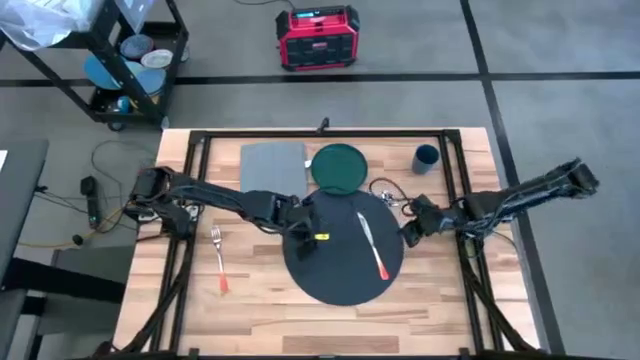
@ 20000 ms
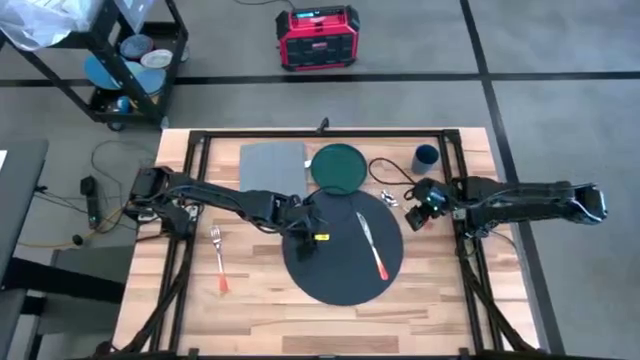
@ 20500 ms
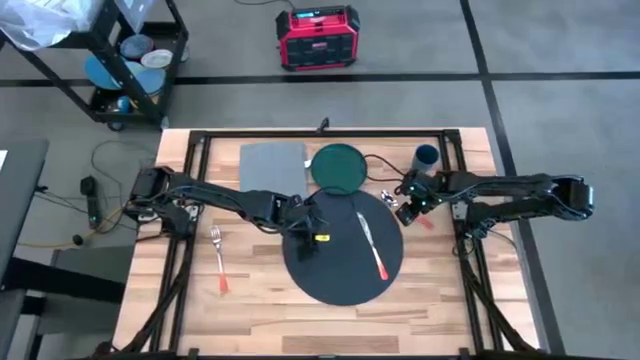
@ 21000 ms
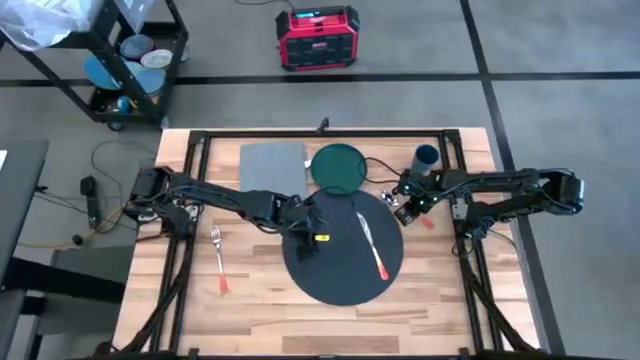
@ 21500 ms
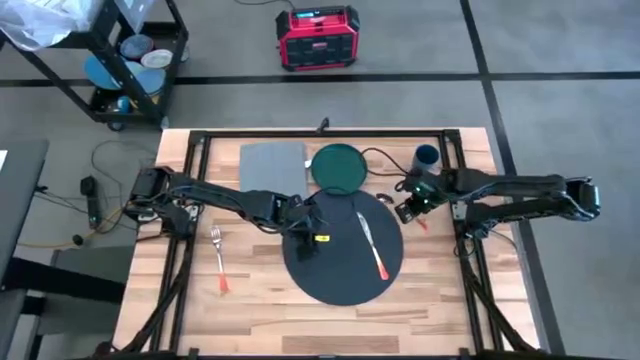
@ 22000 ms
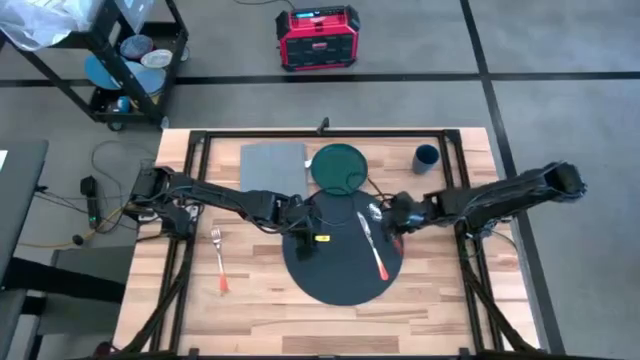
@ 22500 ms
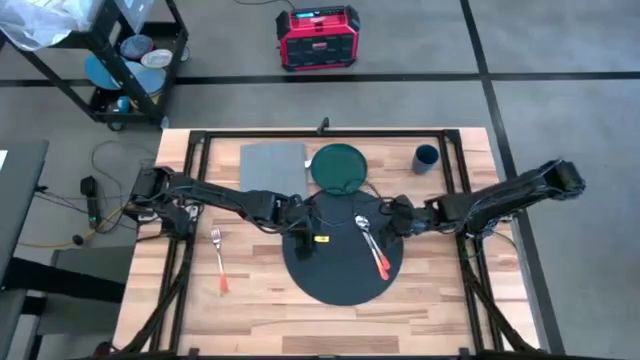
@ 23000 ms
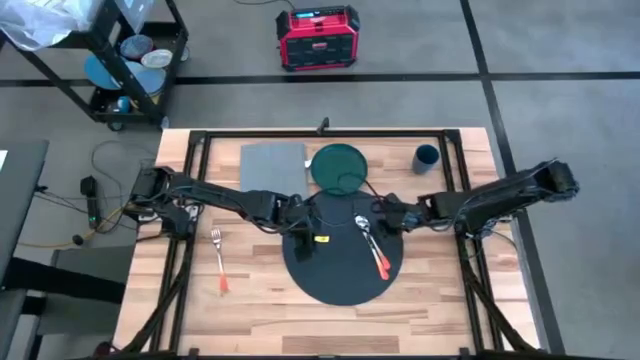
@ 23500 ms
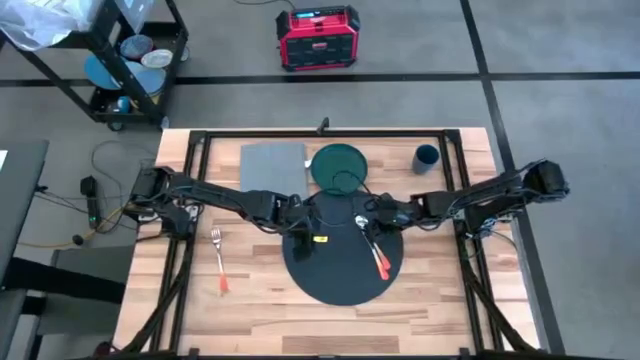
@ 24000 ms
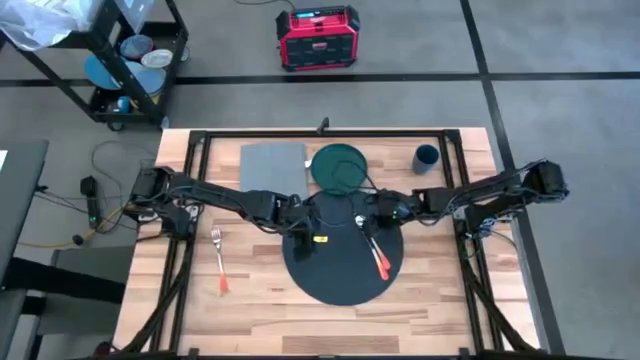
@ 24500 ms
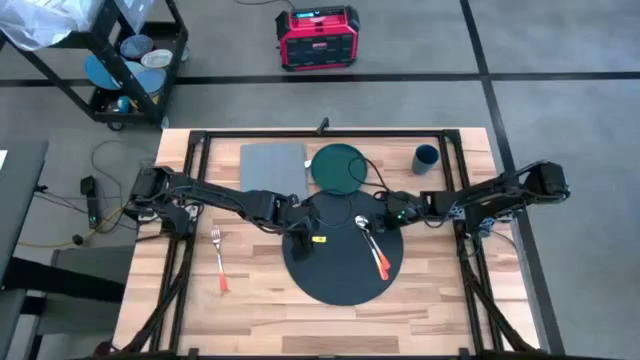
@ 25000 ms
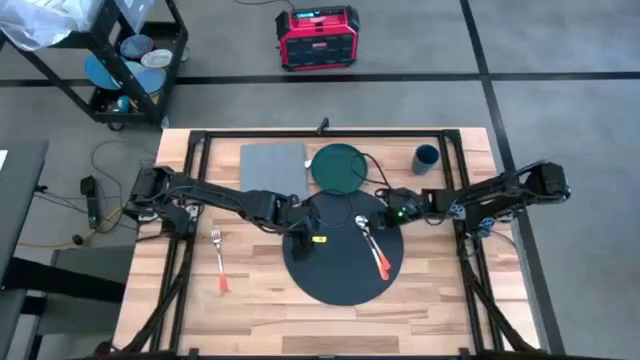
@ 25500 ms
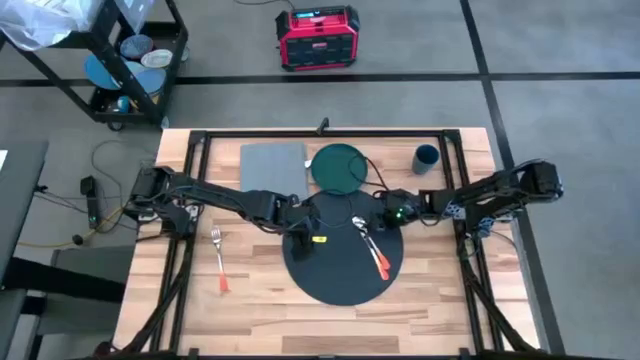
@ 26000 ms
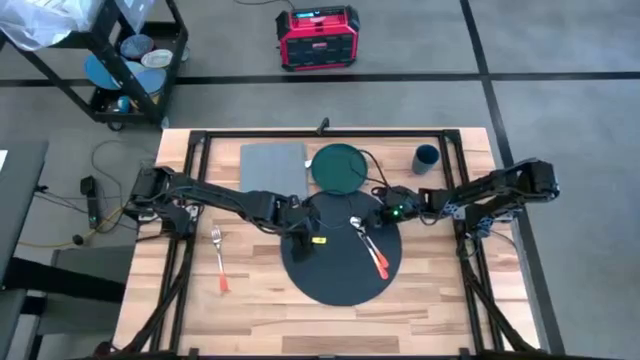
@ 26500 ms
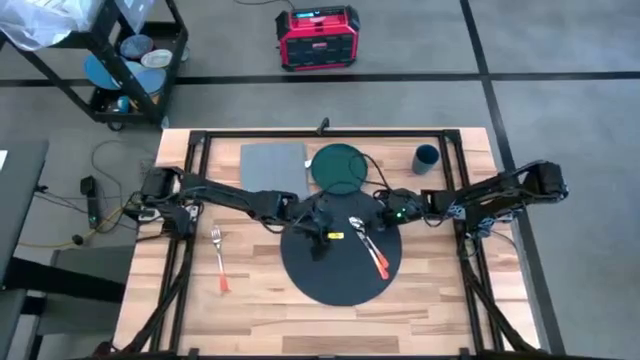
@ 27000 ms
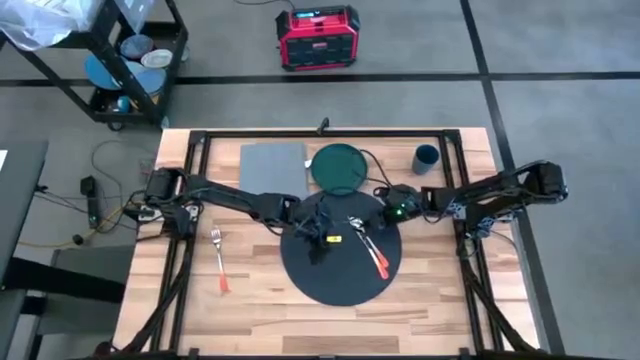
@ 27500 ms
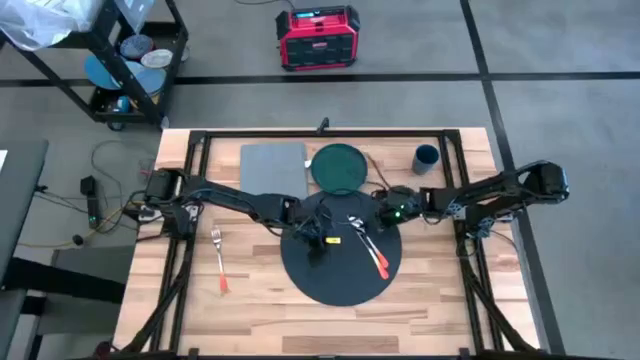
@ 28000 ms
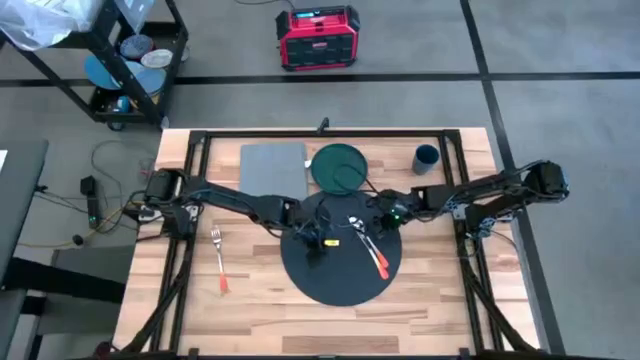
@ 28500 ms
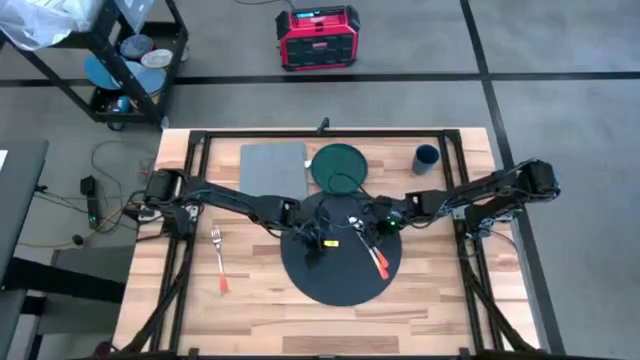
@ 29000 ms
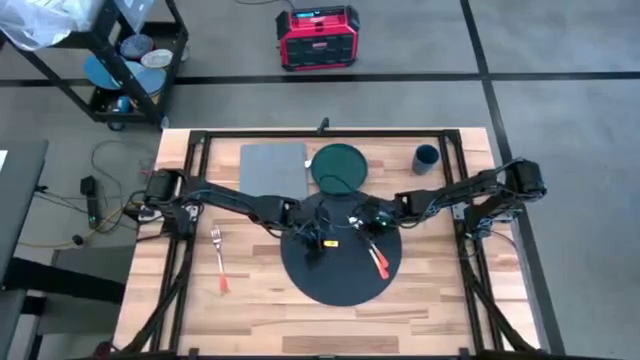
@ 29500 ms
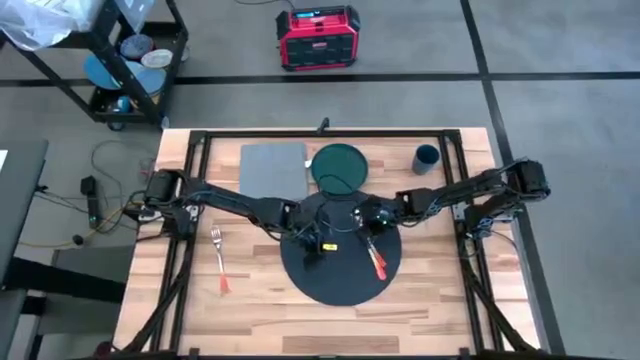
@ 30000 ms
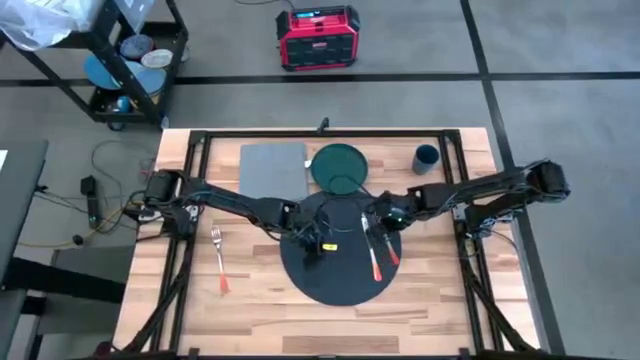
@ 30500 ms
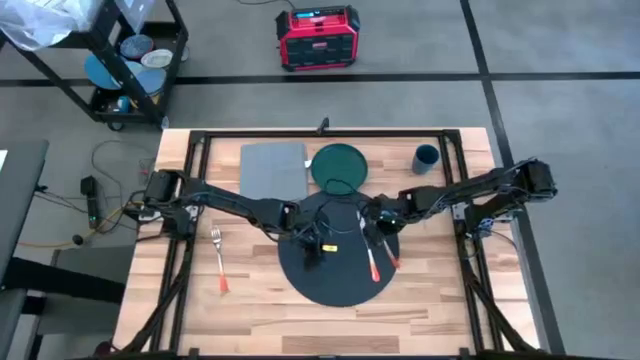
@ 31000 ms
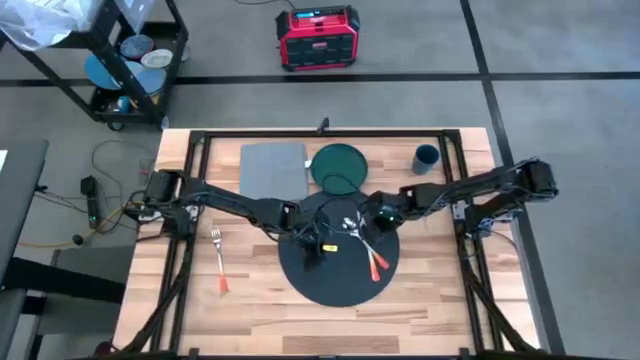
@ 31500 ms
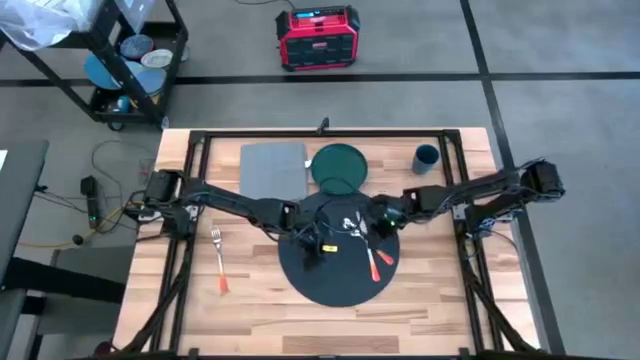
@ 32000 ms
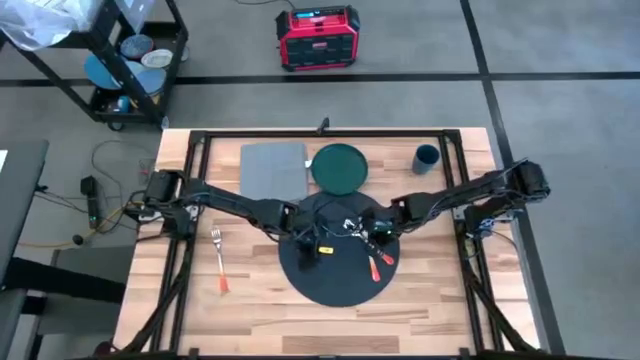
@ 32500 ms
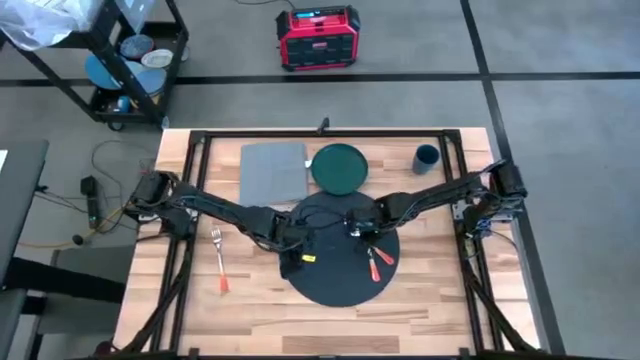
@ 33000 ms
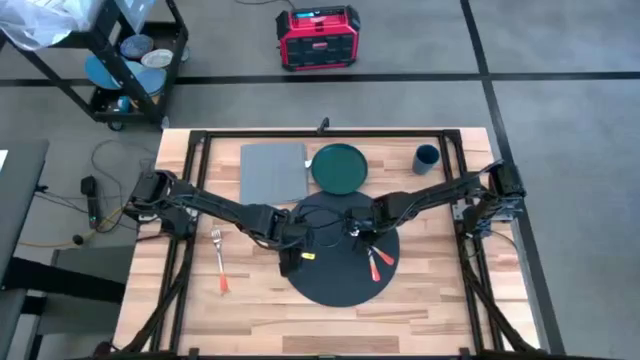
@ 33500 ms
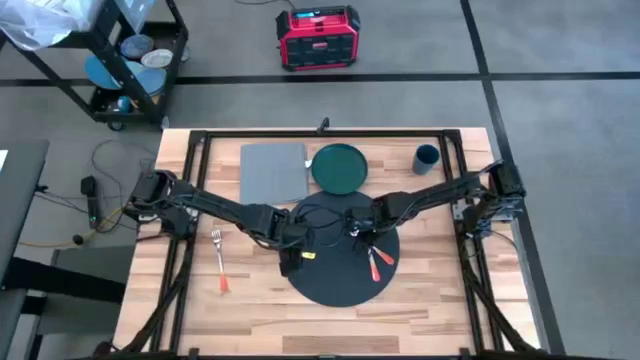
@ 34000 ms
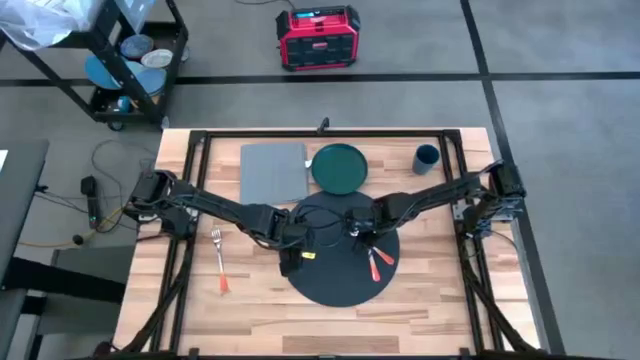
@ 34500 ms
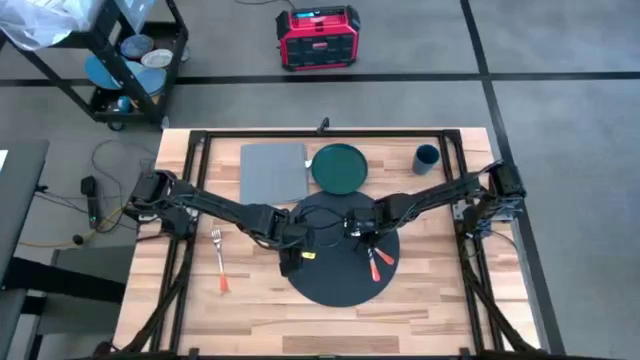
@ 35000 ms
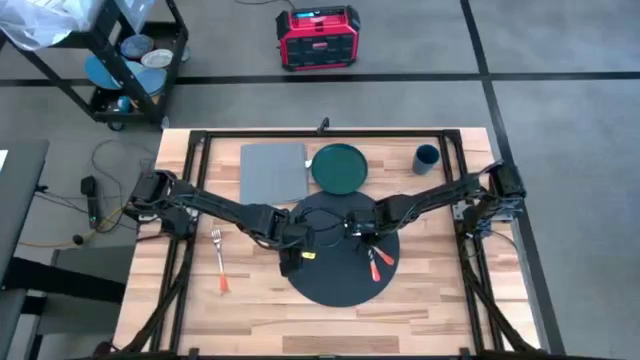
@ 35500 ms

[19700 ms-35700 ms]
Task: Set table place
Put the orange spoon on the blue placemat to the right of the orange table knife

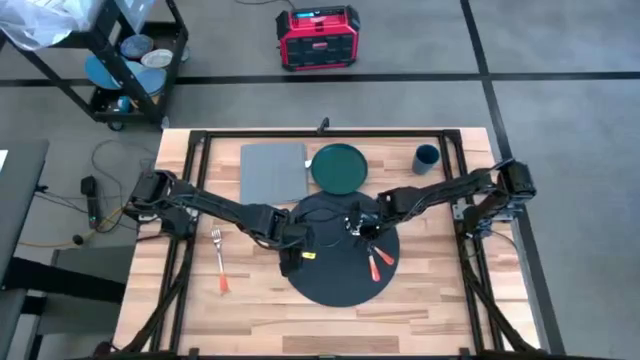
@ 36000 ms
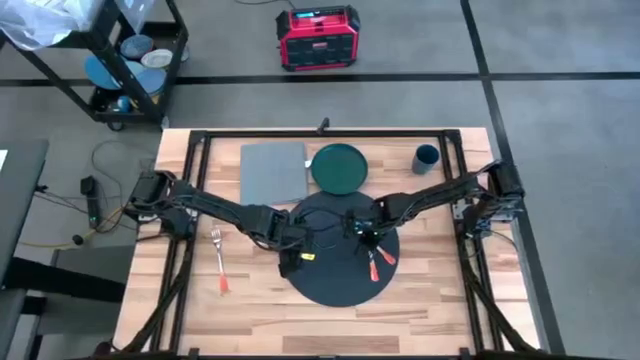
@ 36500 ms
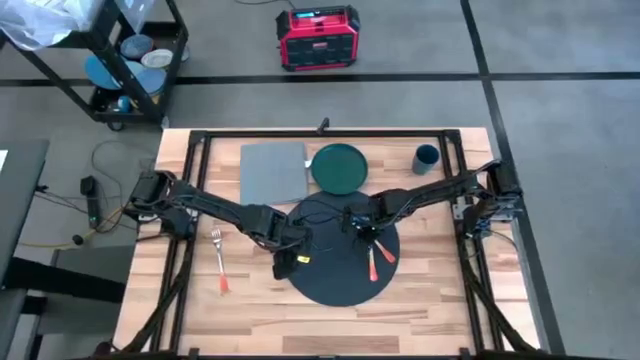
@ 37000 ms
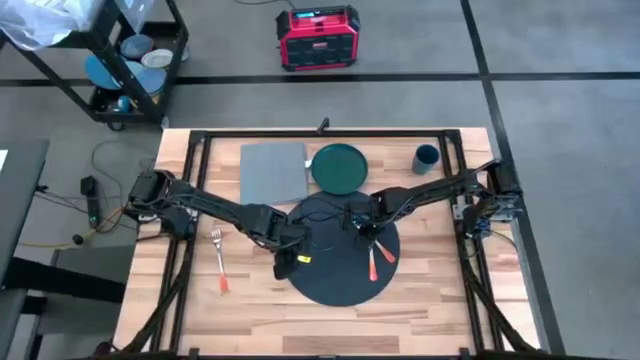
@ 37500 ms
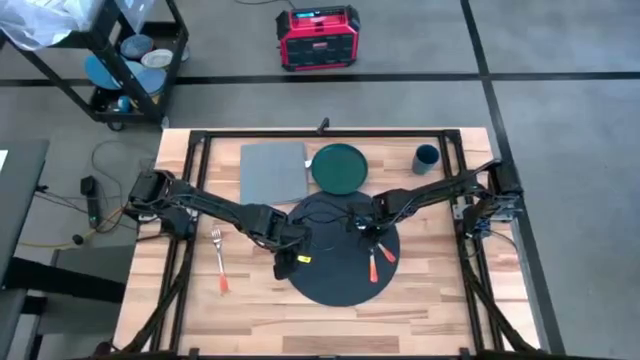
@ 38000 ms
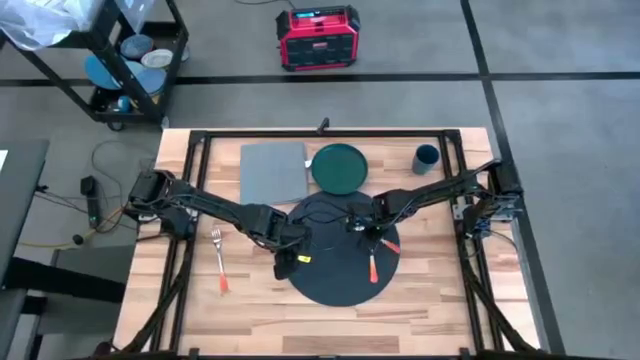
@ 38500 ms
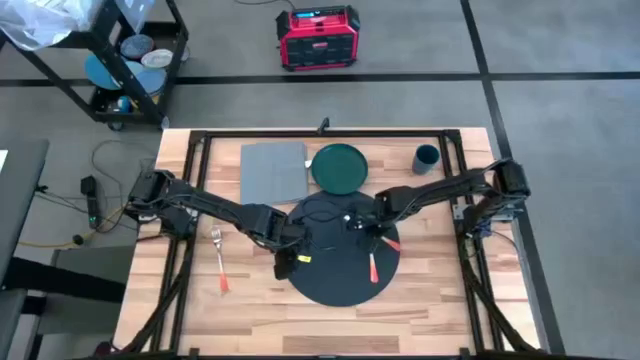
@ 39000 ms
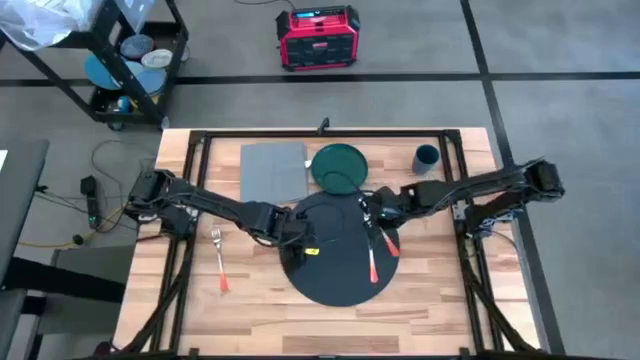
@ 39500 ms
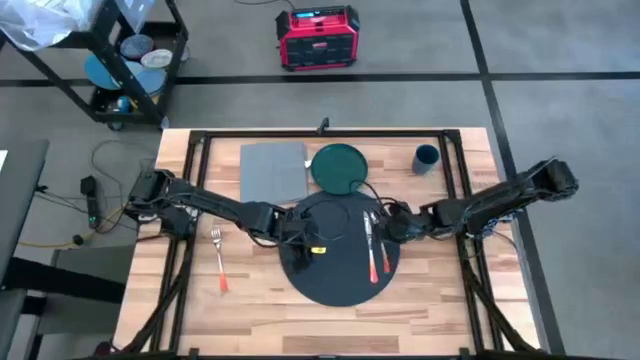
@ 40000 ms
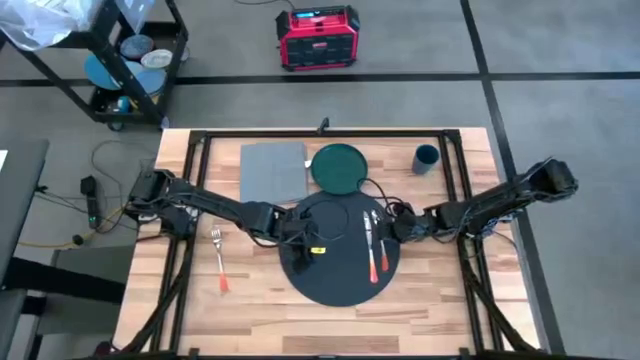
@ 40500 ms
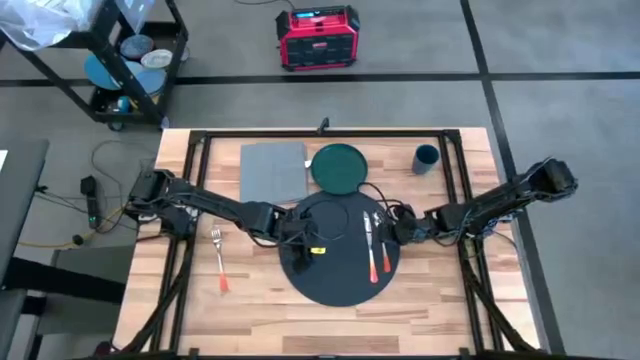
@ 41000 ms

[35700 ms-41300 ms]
Put the orange spoon on the blue placemat to the right of the orange table knife
